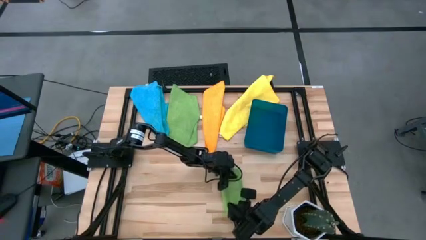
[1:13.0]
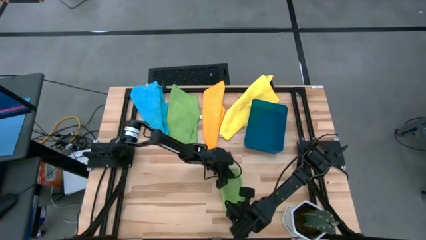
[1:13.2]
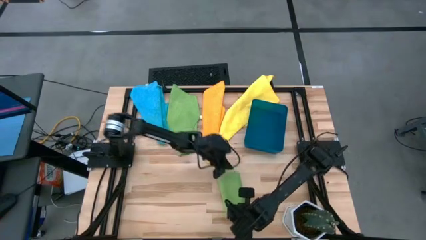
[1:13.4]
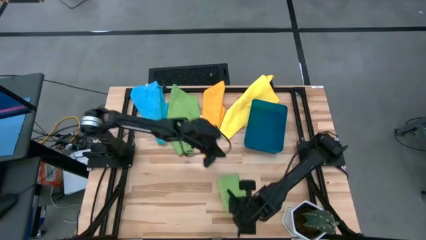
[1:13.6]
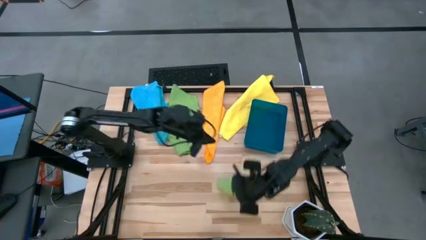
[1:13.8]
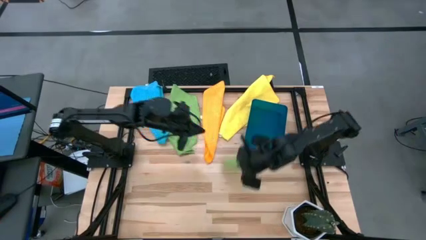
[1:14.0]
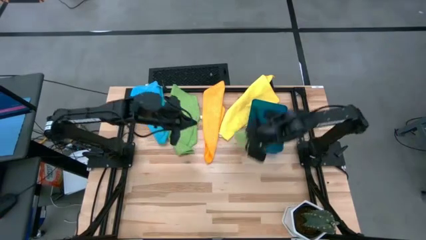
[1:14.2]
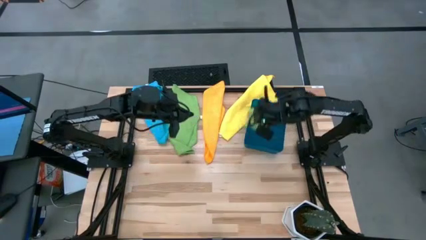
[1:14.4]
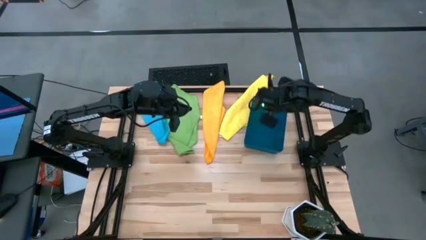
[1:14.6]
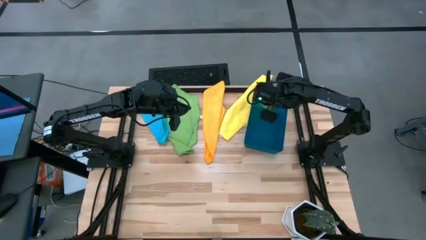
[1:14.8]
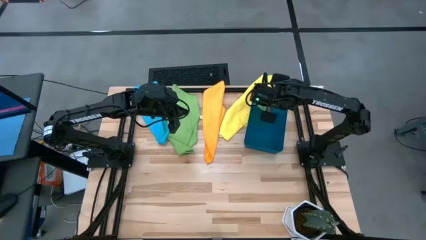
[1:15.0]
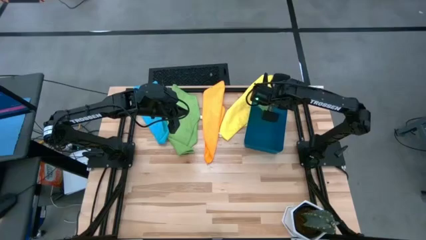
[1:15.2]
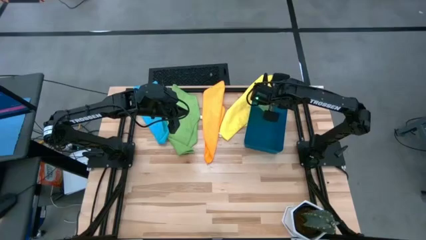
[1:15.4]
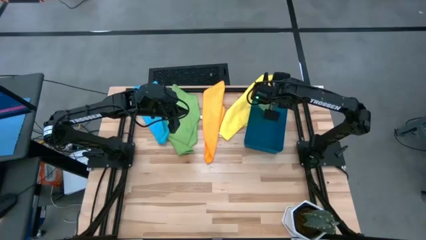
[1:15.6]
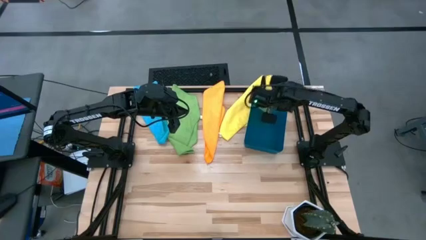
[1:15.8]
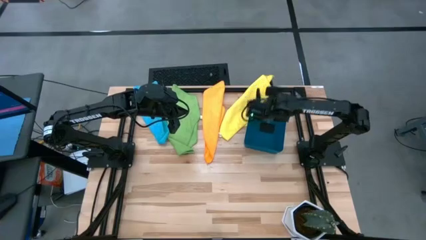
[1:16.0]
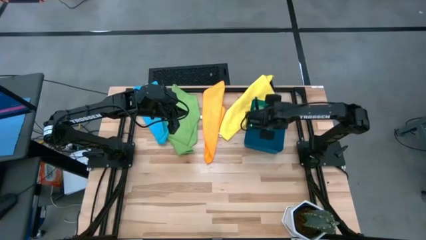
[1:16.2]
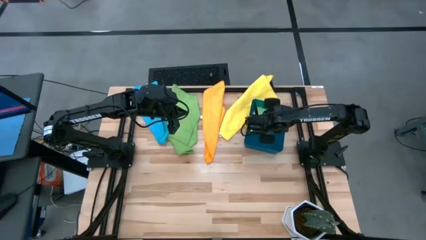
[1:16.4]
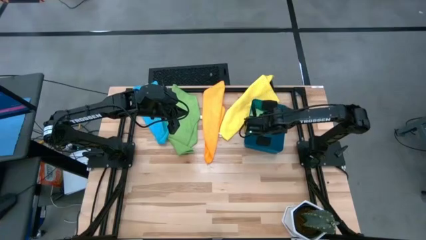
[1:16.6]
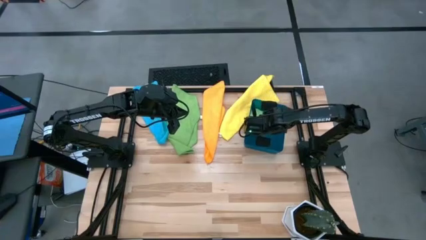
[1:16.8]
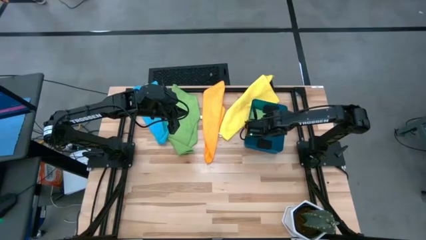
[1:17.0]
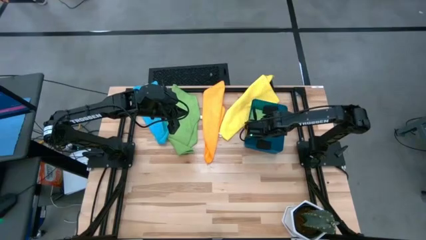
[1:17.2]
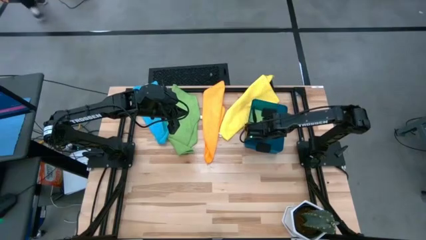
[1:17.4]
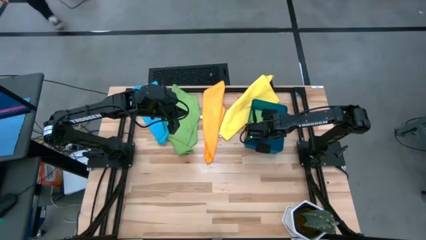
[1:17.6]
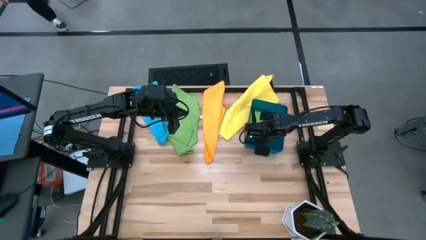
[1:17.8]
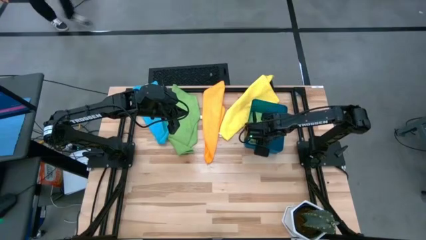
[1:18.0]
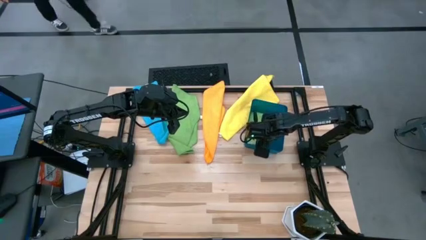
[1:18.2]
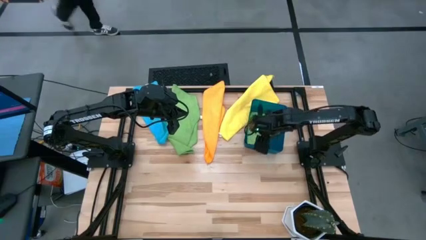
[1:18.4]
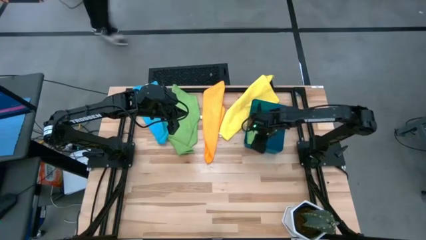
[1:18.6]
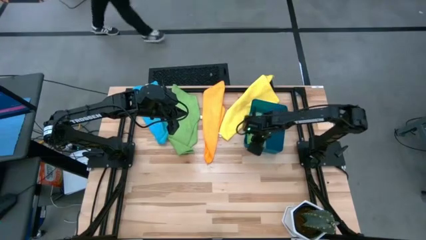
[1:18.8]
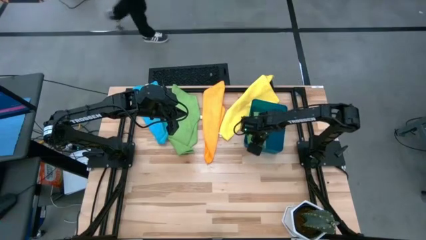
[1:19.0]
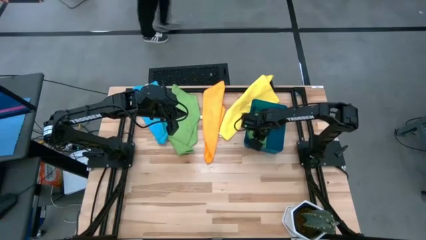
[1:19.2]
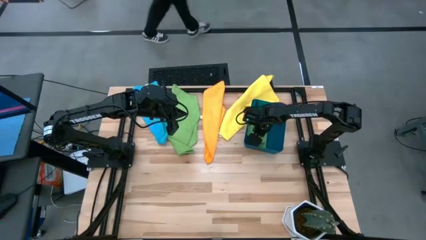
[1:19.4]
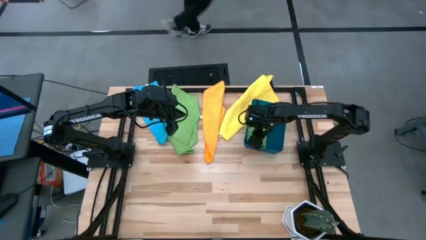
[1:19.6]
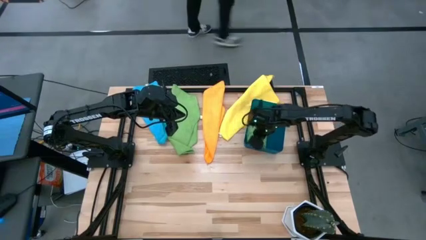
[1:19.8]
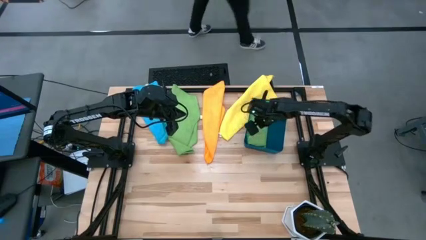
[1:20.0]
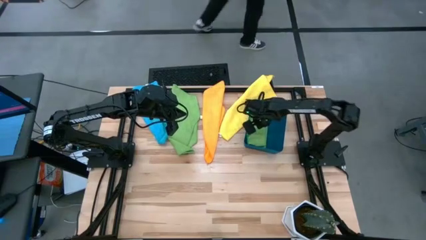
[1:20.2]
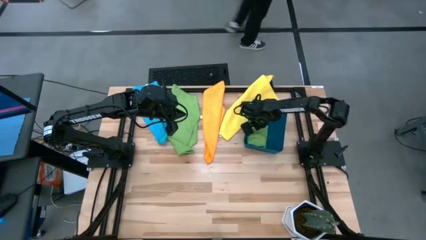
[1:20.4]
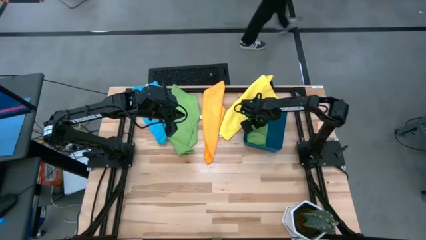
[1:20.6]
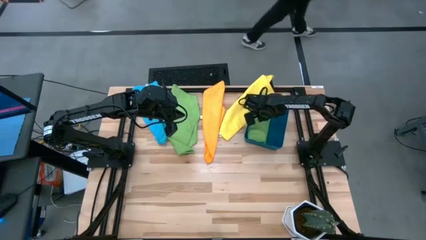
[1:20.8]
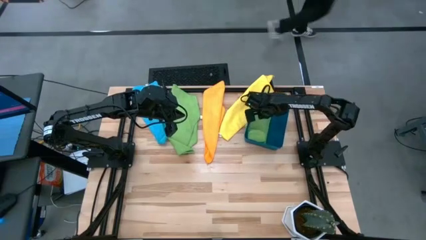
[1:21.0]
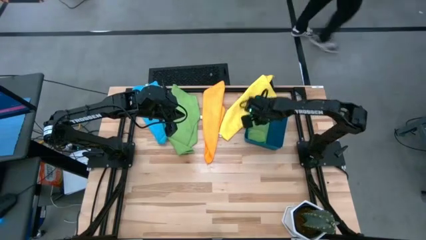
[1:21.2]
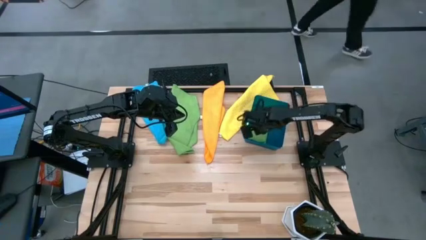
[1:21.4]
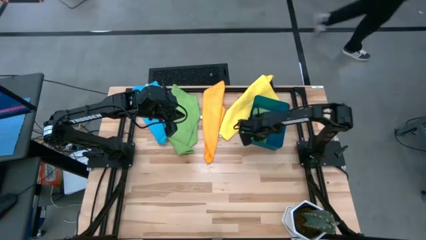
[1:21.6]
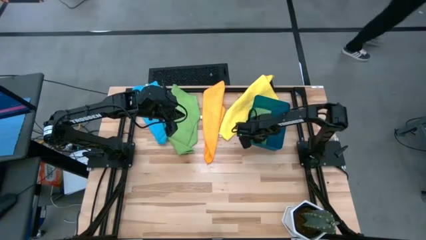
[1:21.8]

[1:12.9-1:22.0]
Task: Fold microfiber towels
Put the bottom green microfiber cloth into the blue bin

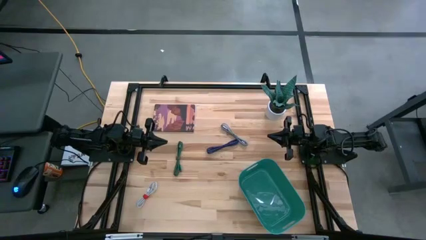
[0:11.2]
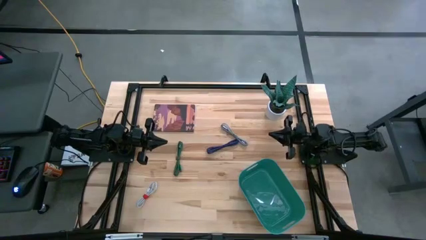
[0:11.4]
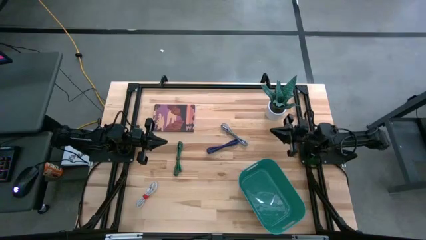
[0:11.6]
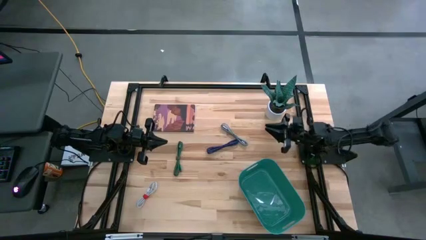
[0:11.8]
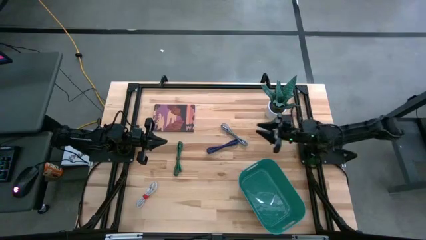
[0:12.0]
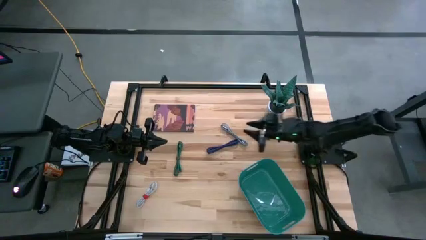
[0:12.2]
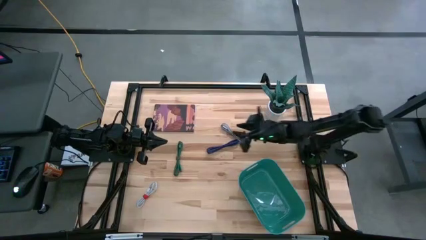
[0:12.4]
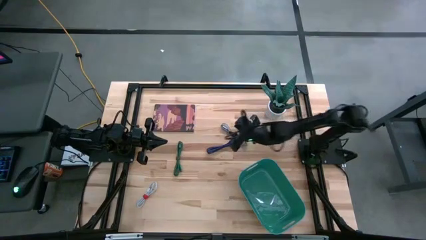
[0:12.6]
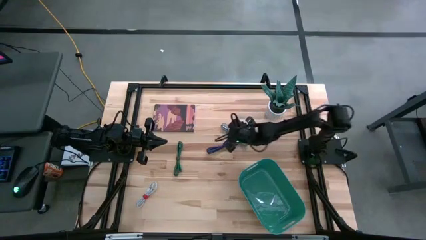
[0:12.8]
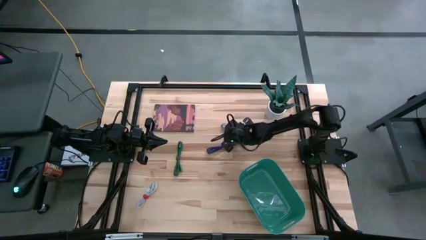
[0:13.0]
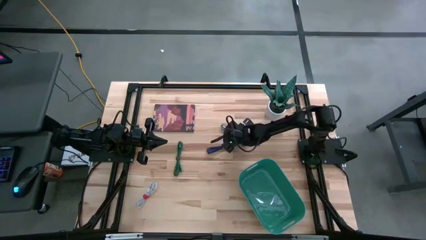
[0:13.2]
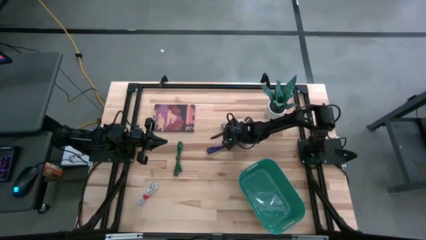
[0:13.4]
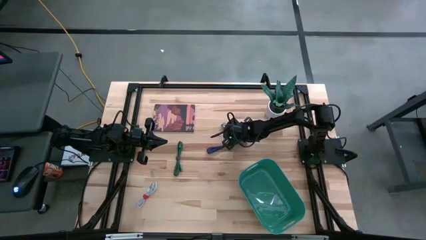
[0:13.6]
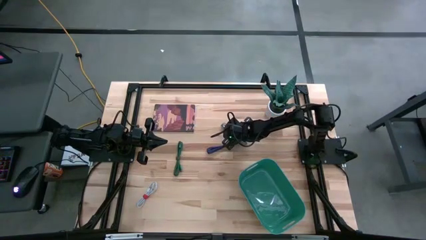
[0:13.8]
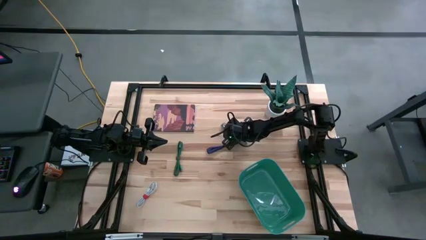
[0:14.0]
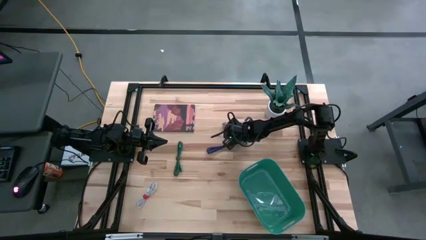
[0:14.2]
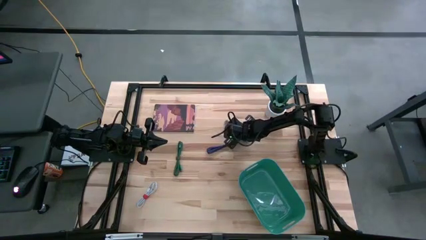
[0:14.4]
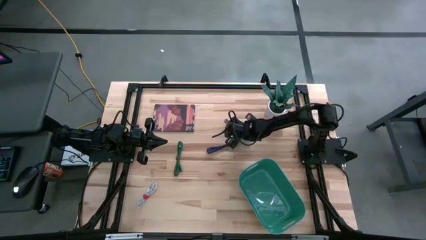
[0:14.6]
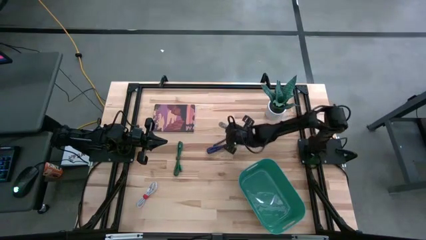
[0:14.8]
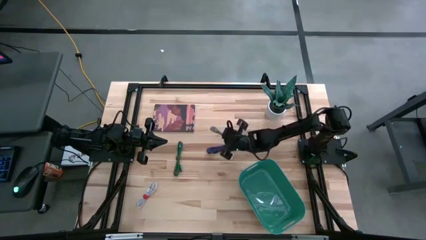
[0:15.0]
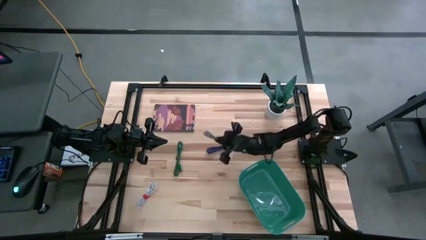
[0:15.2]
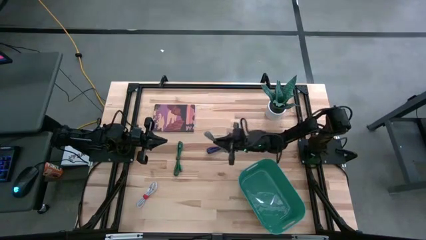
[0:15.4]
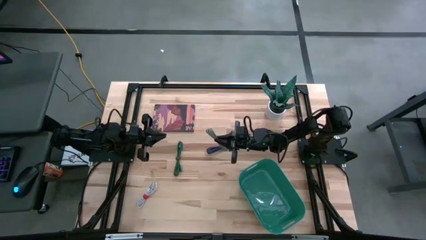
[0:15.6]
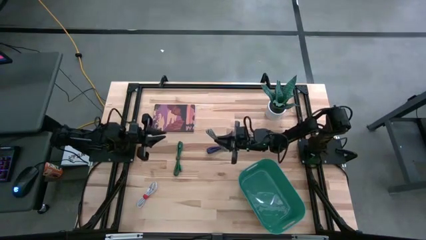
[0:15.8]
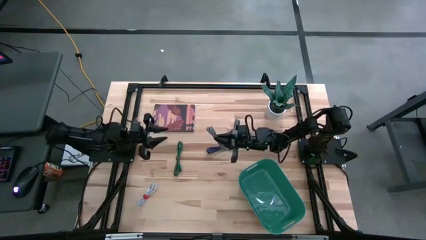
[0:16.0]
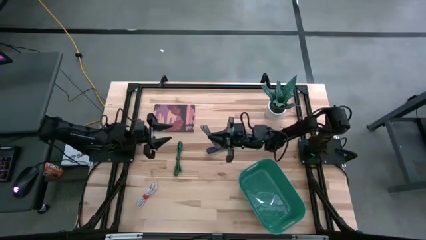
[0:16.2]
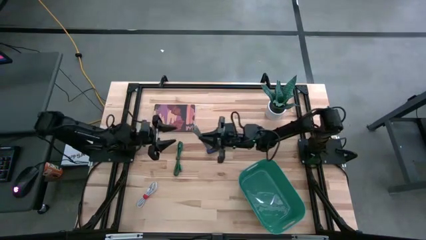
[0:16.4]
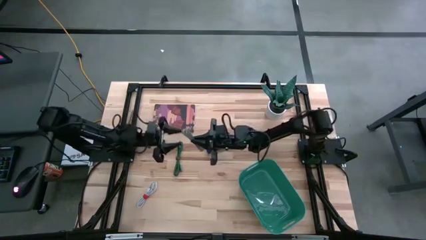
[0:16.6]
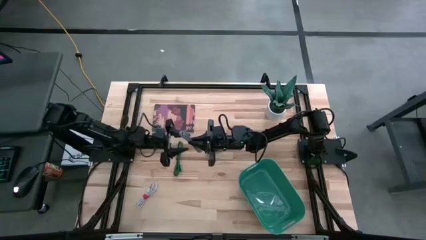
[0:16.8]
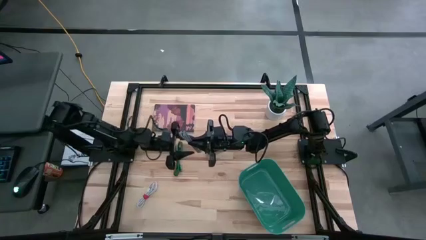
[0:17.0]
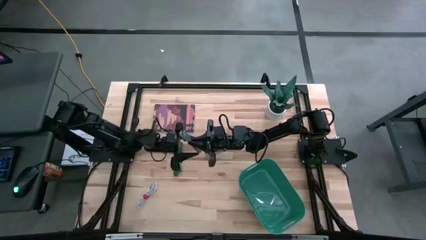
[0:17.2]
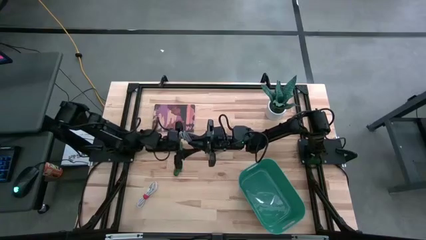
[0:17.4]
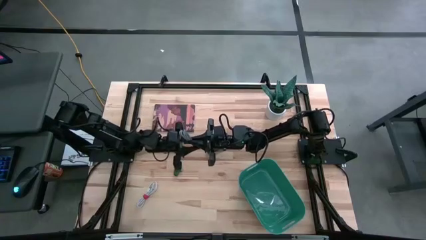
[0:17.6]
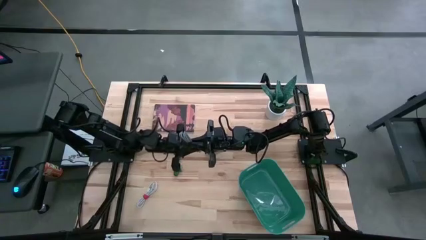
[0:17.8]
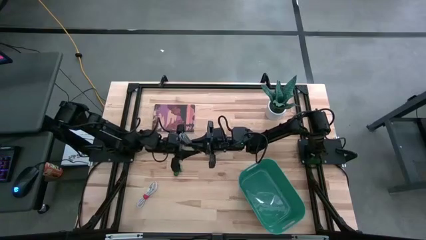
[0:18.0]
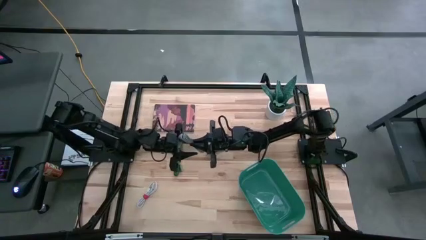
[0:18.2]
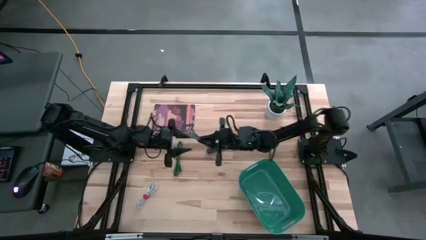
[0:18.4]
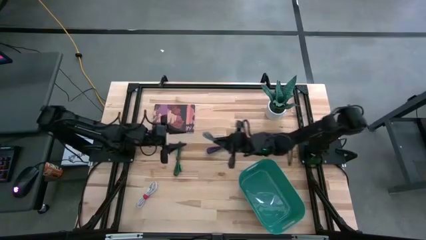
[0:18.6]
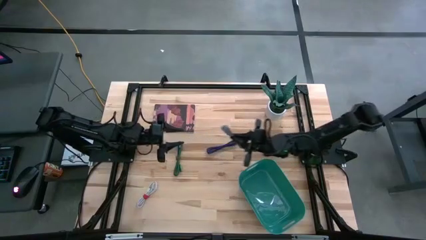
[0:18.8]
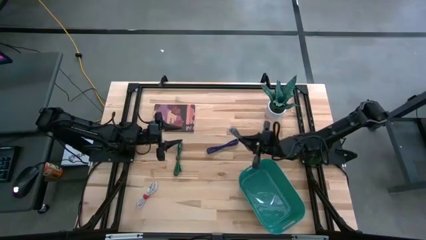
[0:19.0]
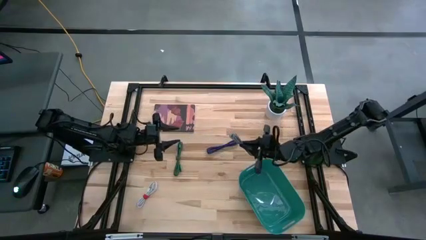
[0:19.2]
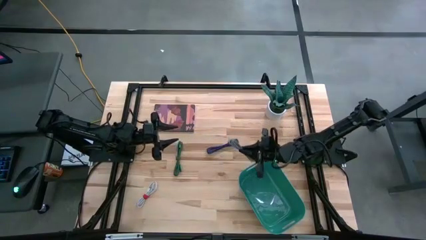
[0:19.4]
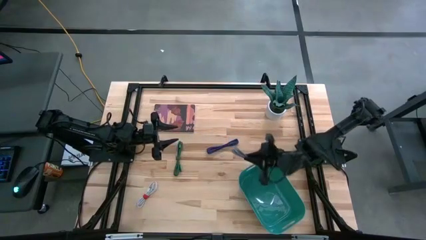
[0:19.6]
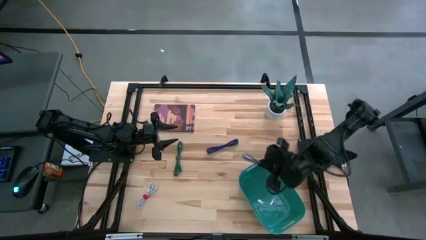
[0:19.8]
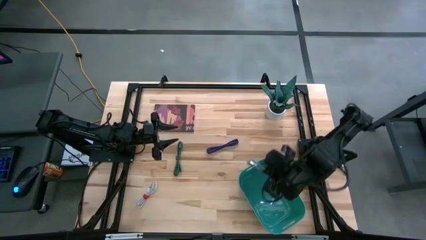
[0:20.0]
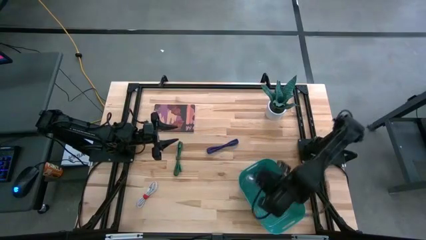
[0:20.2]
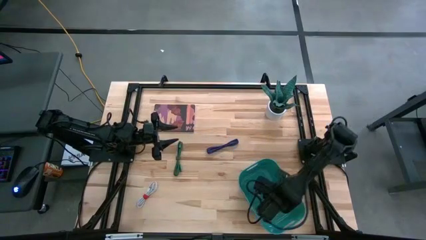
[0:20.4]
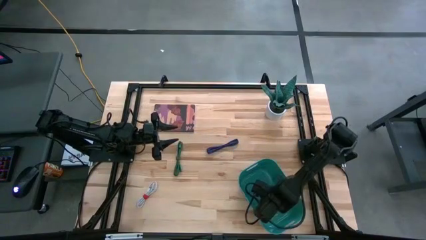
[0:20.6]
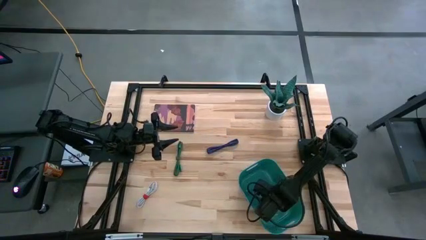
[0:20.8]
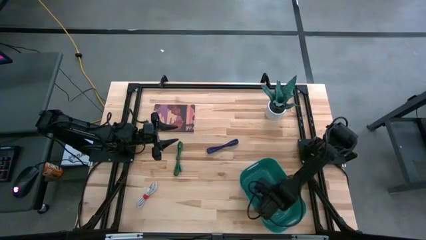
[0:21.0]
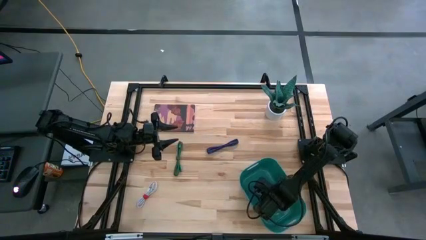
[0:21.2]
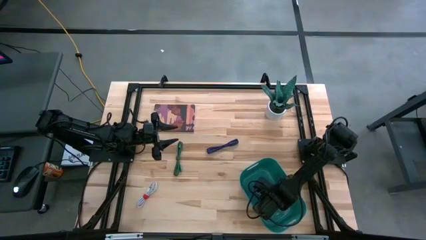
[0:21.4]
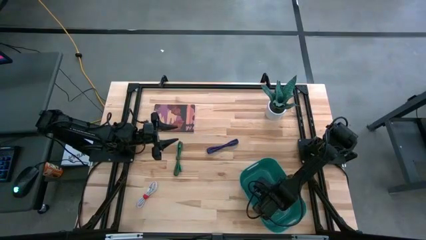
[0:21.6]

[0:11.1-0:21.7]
Task: Pick and place USB-C Cables
Put the black white USB cable into the green bin
